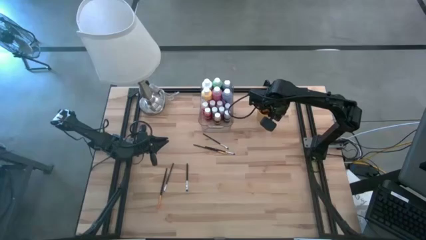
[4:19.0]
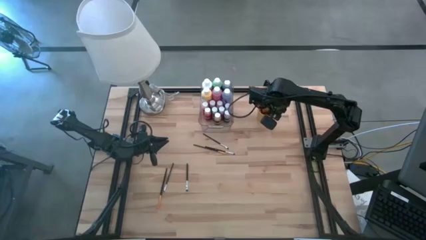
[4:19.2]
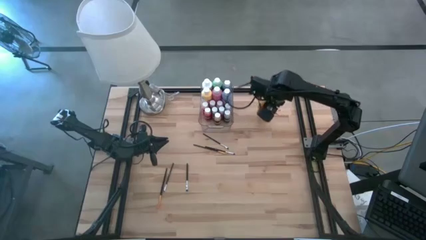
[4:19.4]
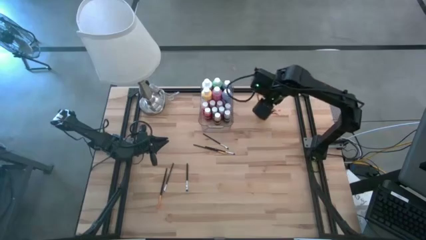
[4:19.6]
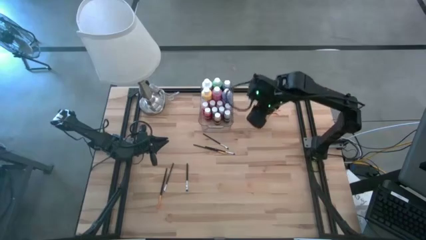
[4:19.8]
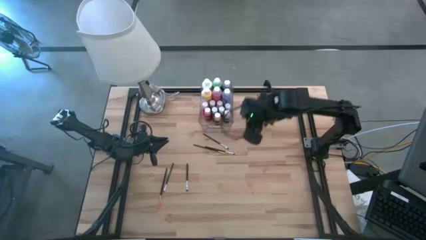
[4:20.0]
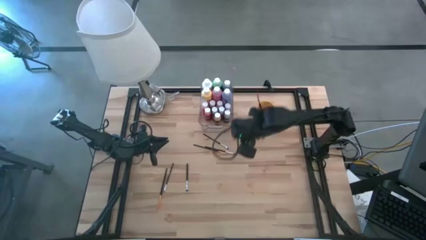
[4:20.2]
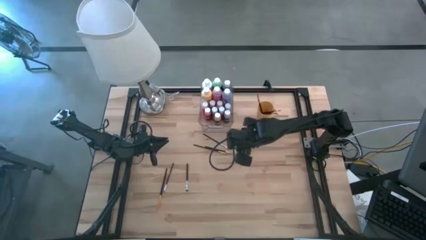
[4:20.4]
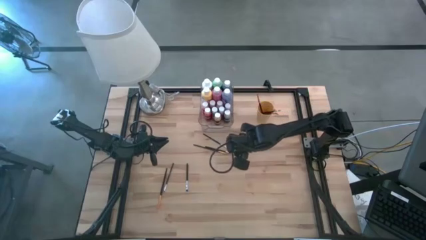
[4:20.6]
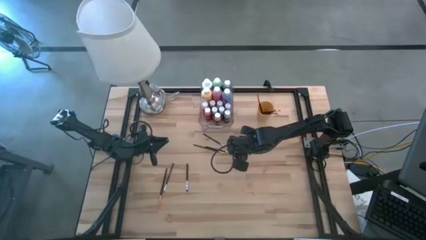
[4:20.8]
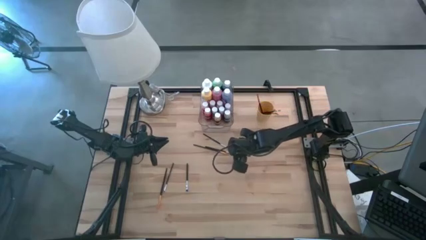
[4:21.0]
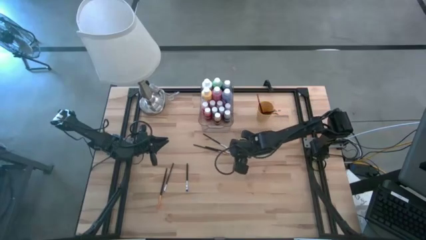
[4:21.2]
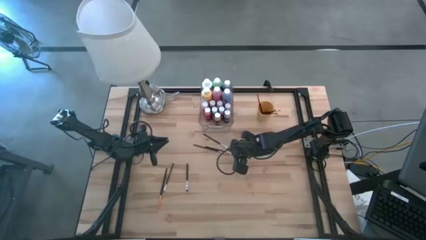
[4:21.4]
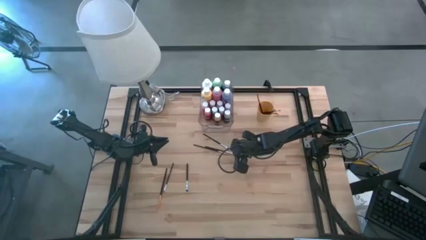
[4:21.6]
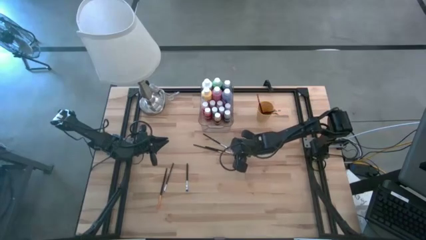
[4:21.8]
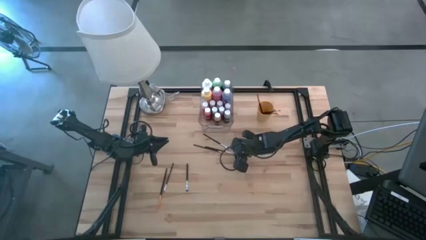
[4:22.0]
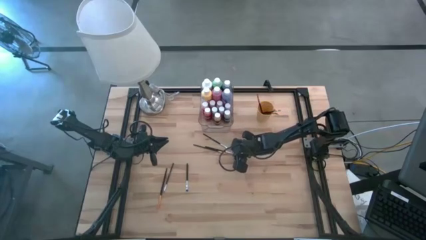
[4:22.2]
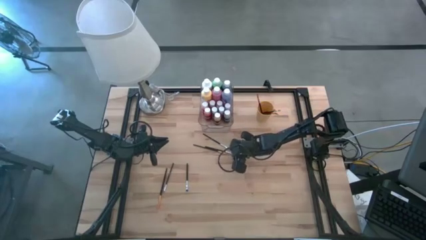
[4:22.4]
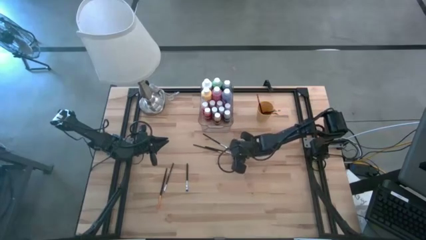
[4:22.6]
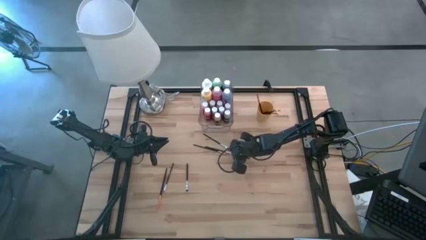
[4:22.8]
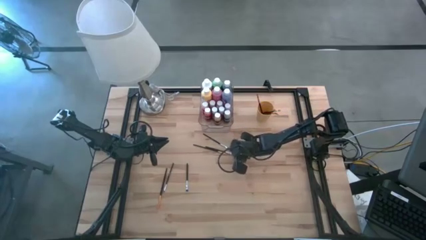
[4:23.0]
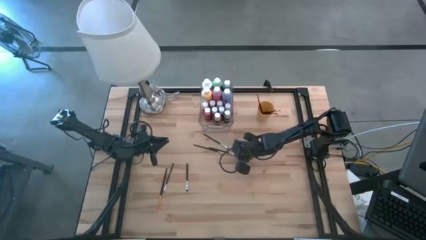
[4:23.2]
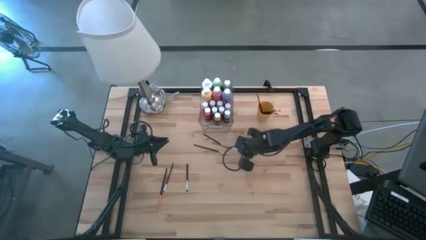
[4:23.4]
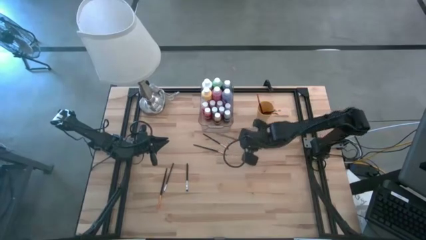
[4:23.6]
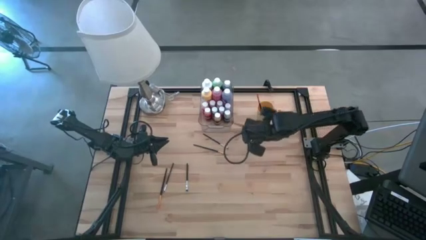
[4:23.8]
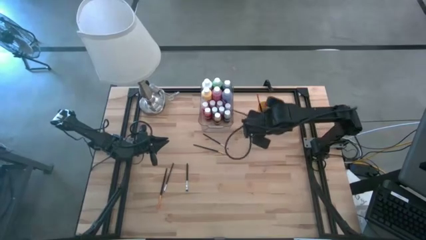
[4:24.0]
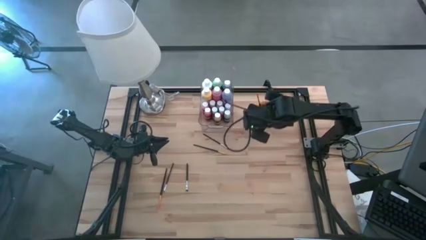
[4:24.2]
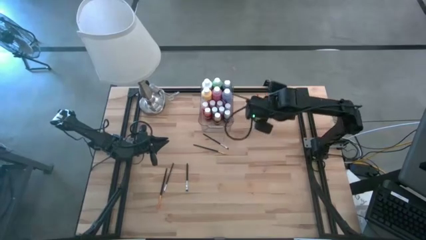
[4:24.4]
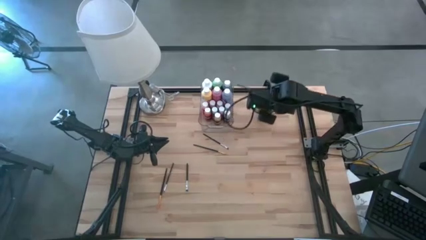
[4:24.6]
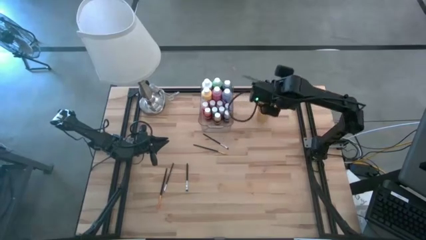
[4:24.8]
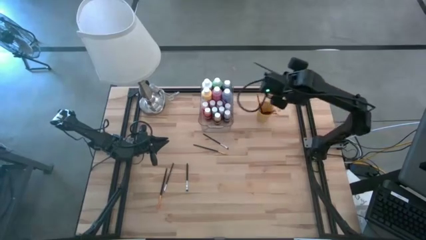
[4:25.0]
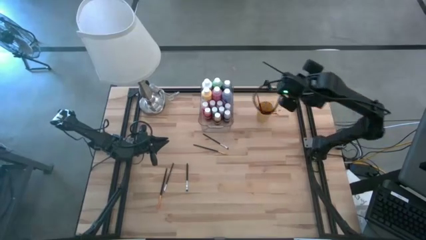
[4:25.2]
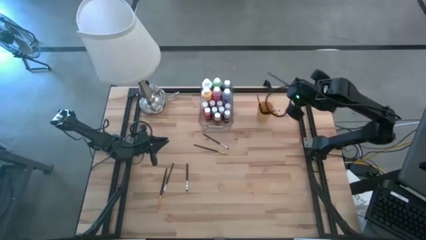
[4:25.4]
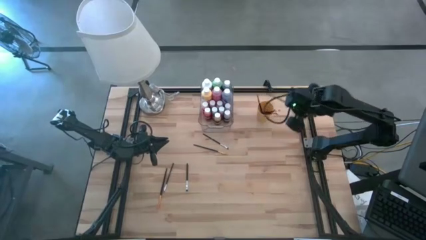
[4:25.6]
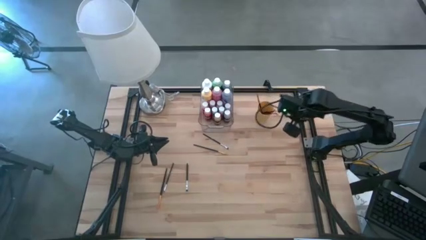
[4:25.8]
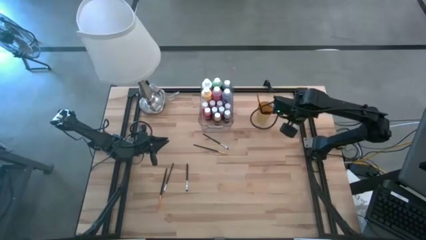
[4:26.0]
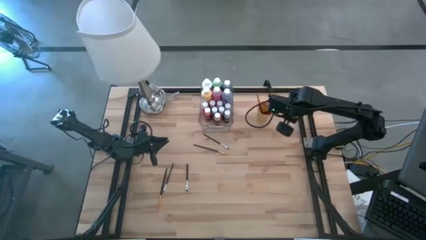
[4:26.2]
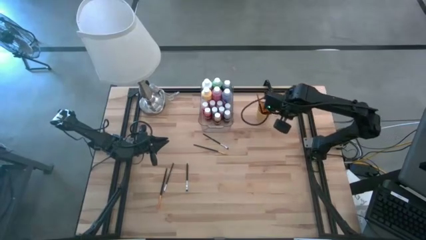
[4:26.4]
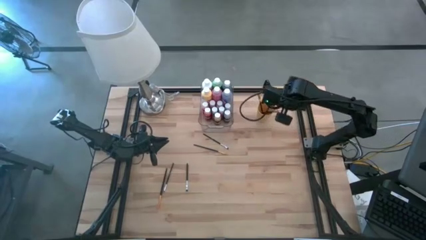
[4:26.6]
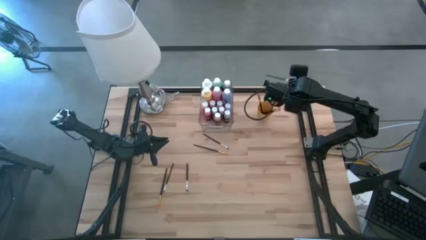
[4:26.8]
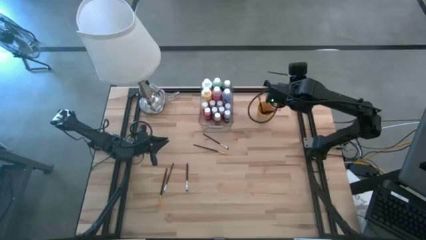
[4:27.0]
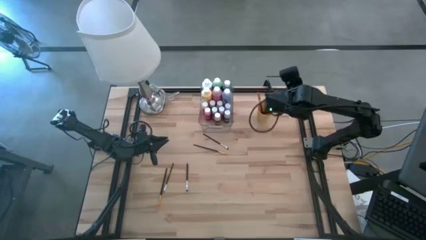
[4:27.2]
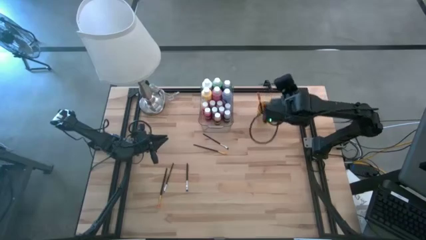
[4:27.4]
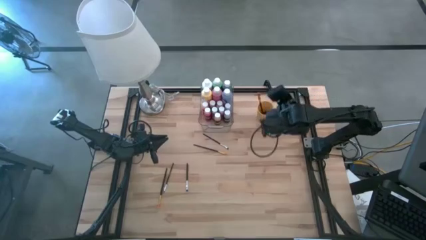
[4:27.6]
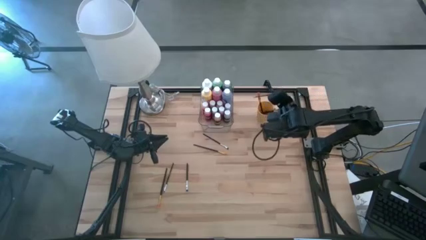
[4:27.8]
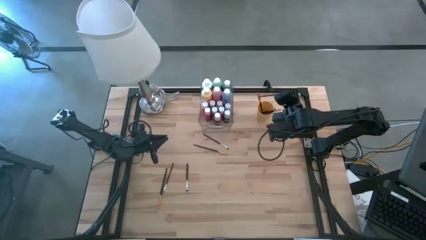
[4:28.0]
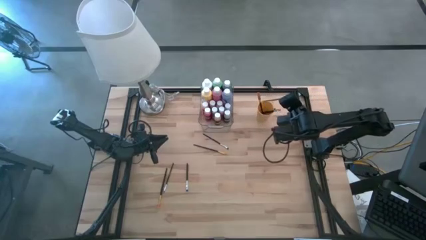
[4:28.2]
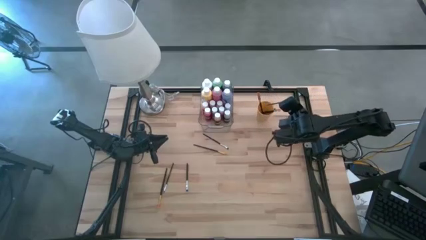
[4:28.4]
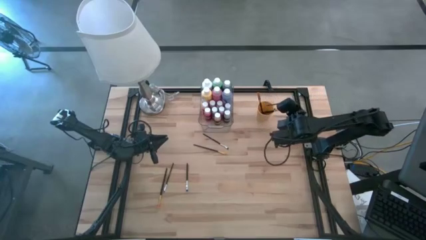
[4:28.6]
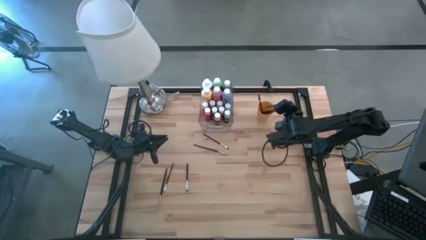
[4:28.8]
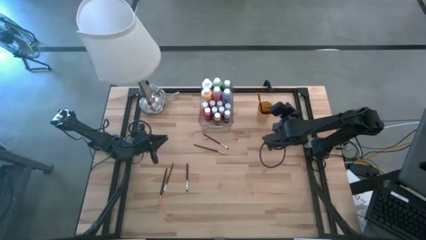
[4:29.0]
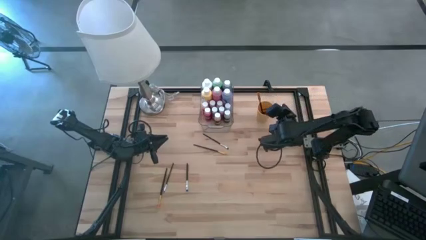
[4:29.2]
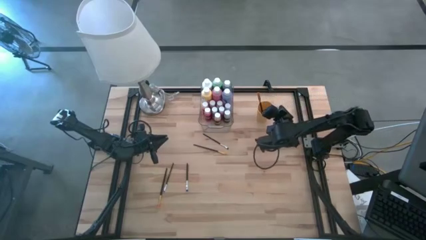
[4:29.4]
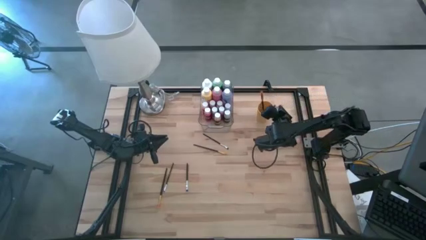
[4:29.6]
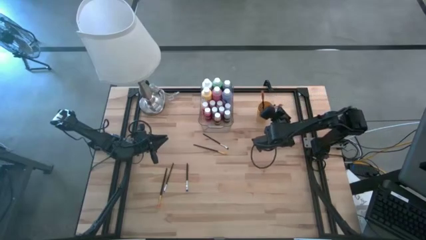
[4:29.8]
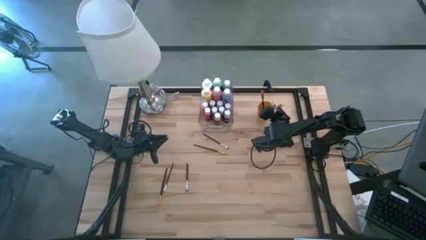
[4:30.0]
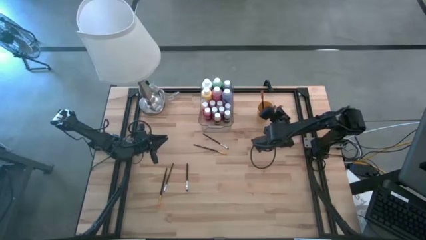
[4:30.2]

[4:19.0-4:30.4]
Task: Pick & Place Paint Supplies
Put the silver paint brush into the cup

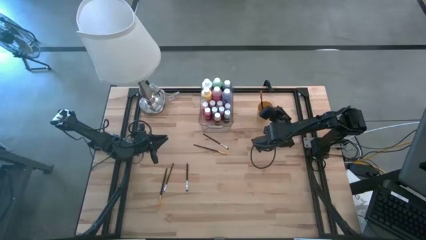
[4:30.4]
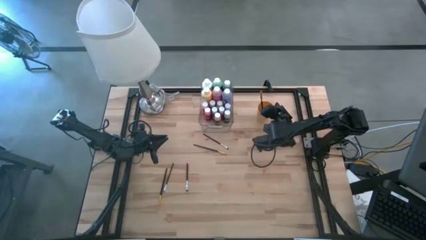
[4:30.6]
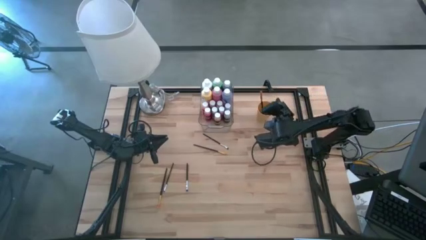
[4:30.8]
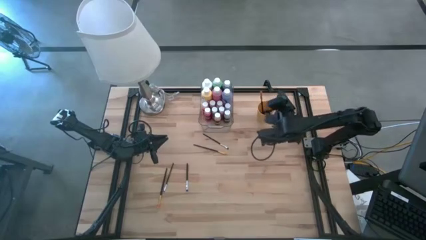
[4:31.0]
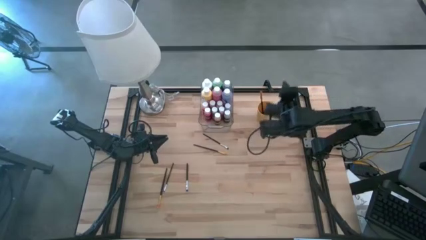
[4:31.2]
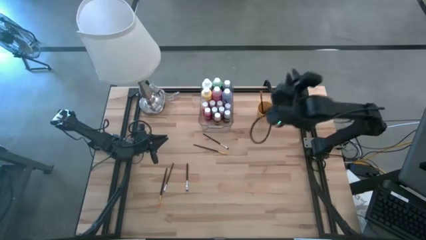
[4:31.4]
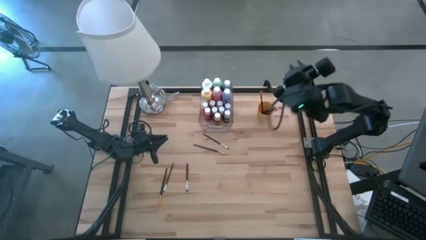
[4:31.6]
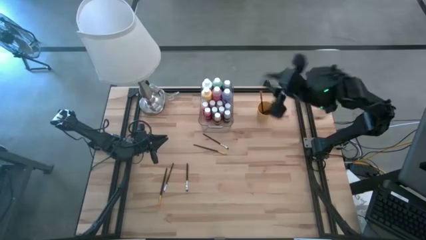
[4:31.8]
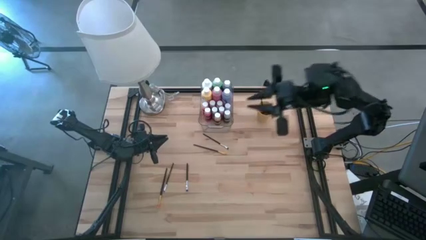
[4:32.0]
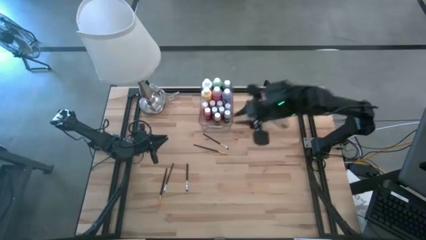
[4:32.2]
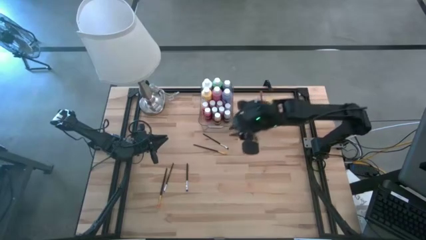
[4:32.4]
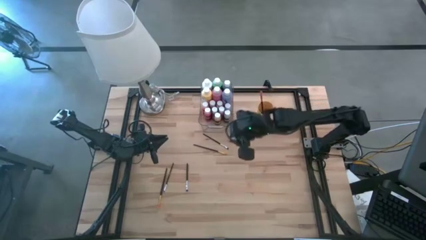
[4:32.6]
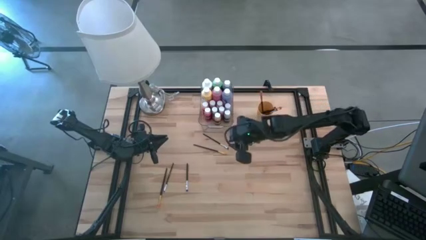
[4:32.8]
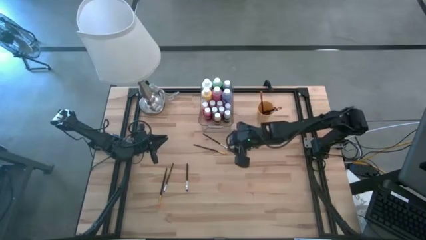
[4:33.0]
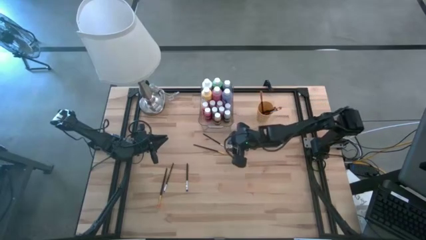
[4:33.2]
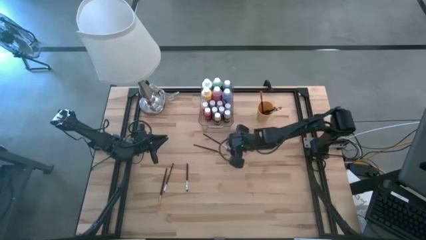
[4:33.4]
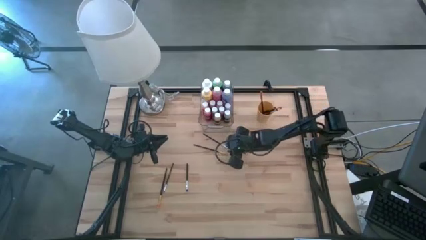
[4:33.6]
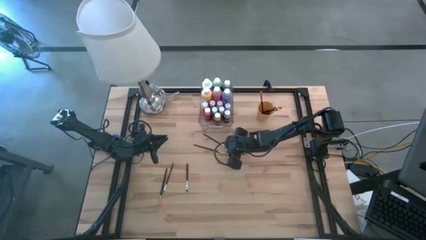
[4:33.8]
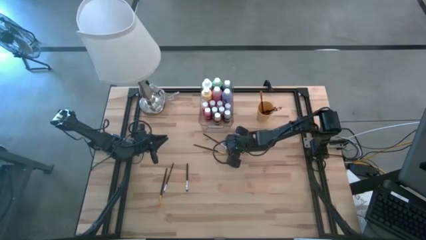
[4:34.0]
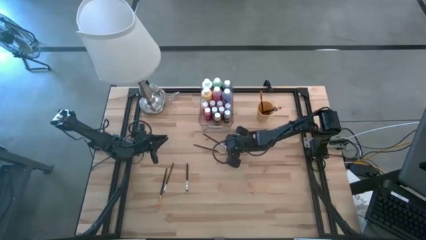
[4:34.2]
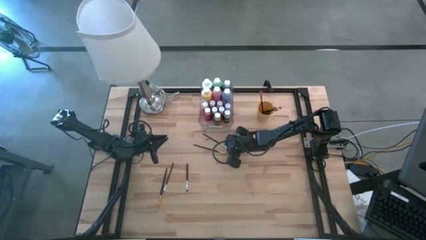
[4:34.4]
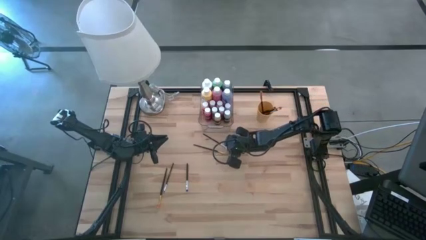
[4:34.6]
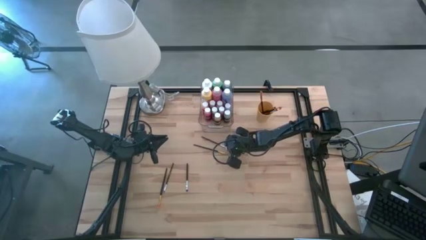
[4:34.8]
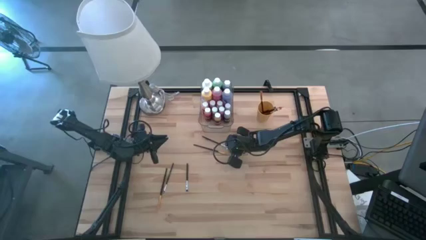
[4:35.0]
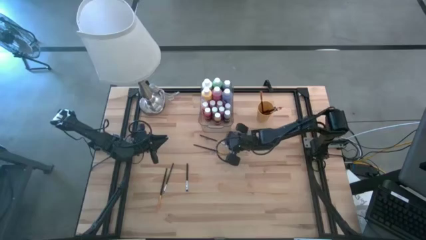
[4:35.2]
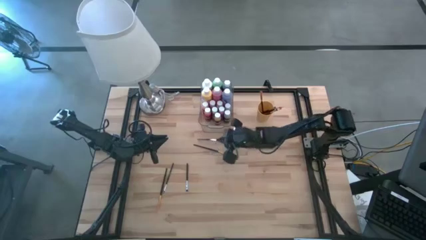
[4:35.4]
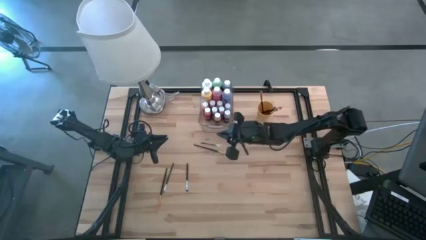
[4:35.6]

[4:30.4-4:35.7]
Put the silver paint brush into the cup
